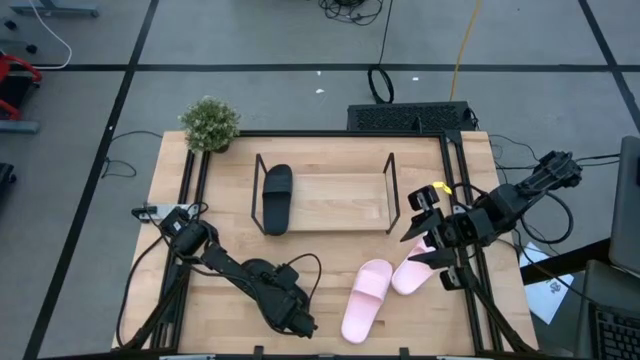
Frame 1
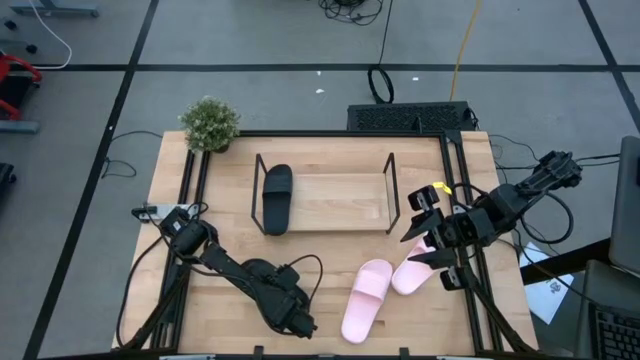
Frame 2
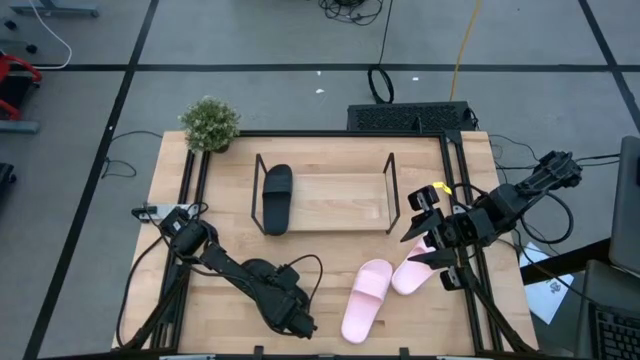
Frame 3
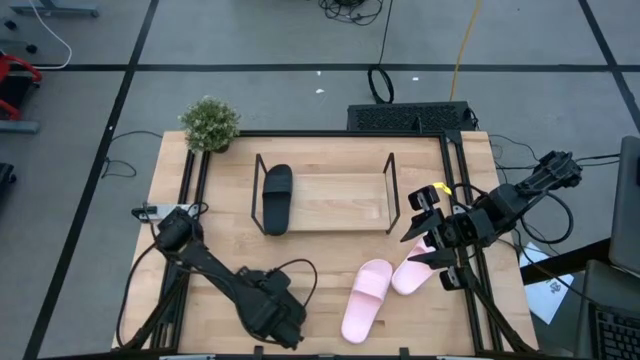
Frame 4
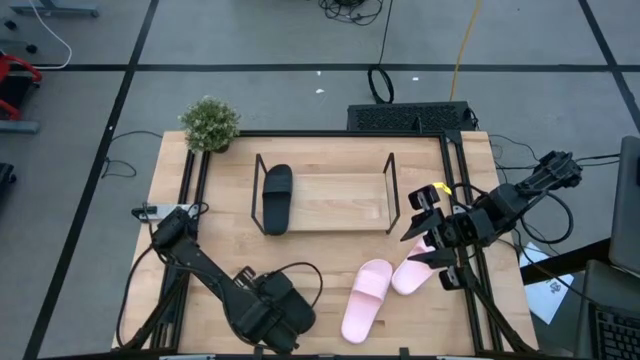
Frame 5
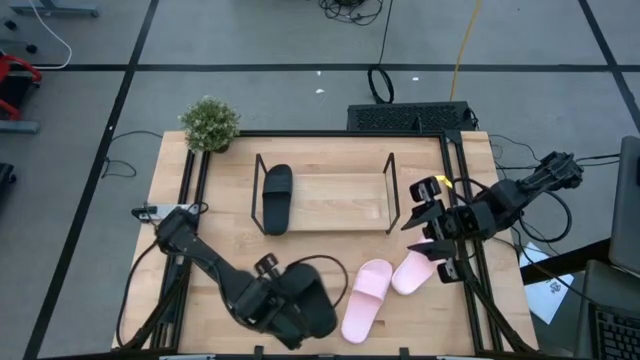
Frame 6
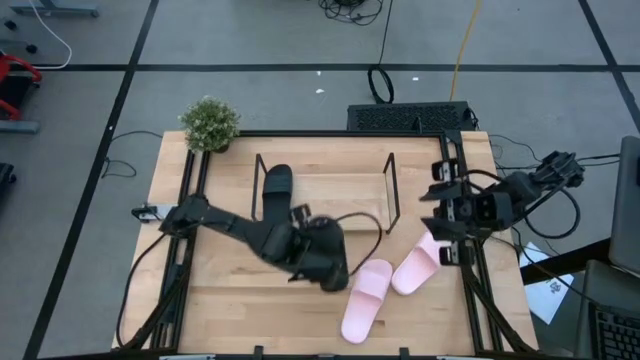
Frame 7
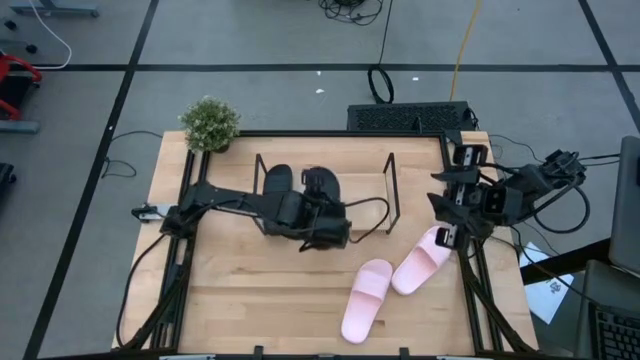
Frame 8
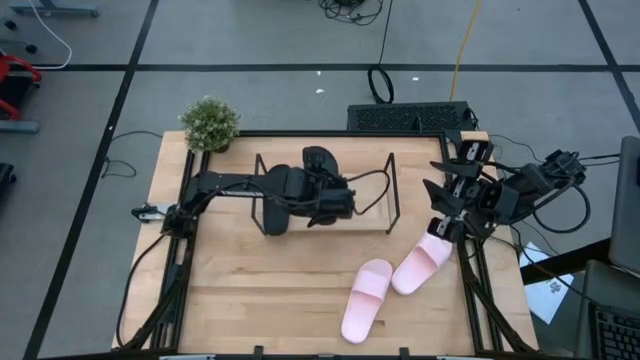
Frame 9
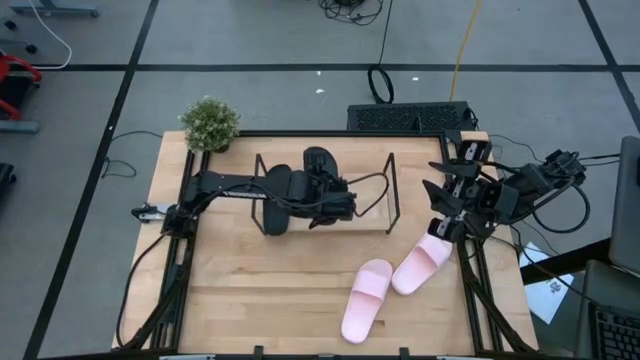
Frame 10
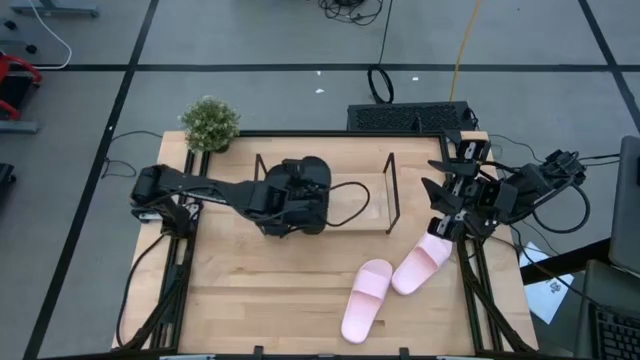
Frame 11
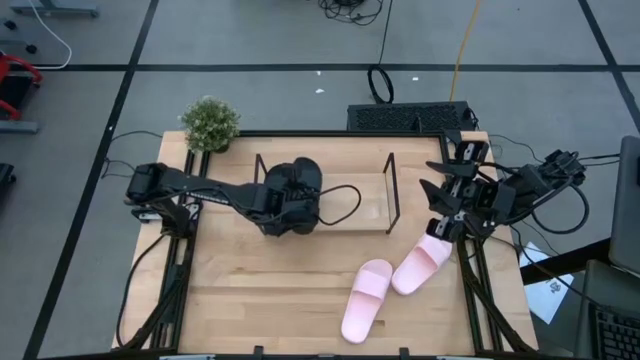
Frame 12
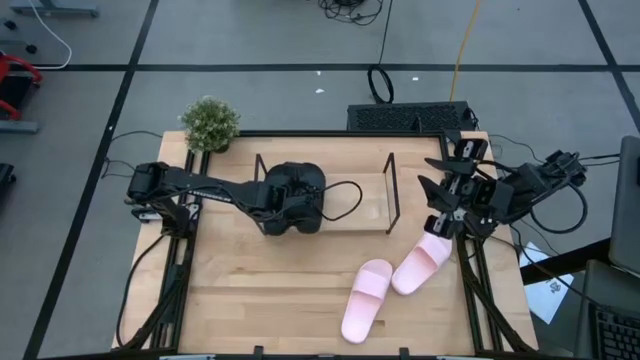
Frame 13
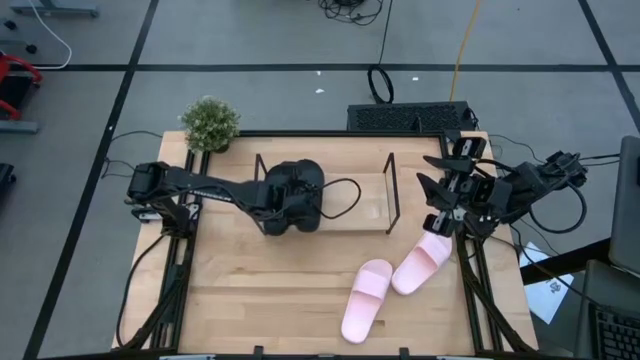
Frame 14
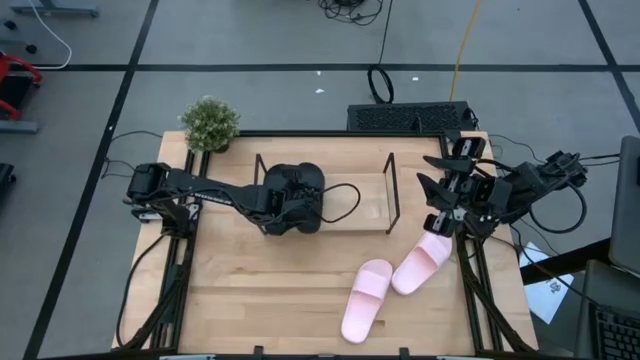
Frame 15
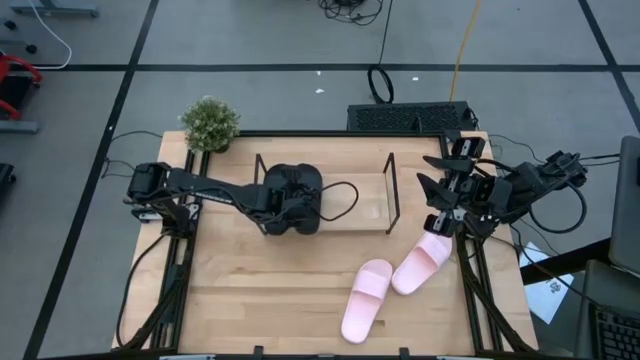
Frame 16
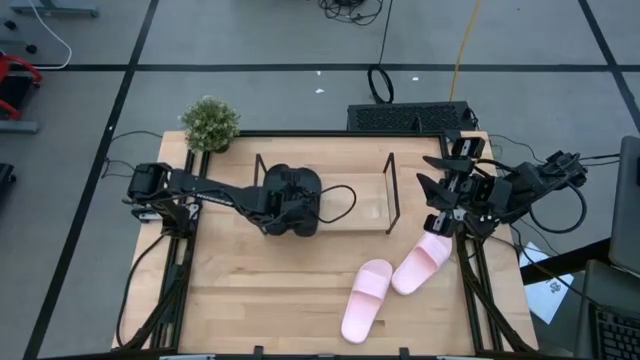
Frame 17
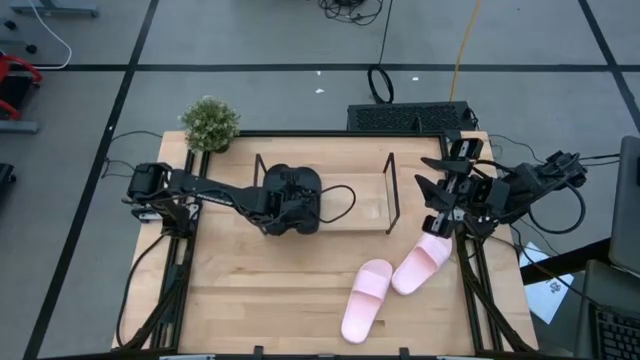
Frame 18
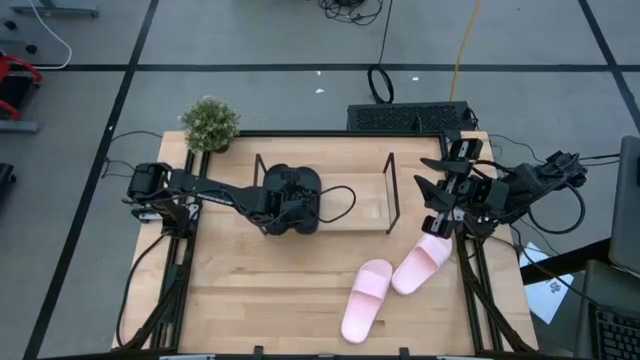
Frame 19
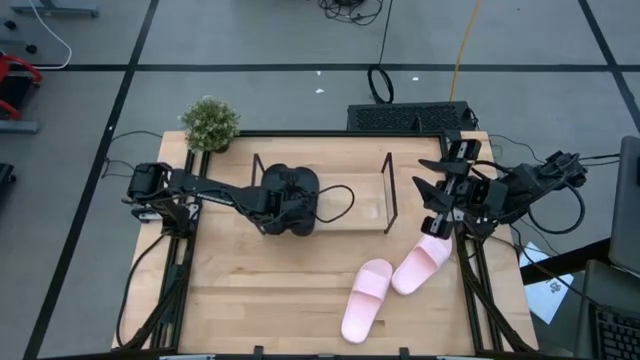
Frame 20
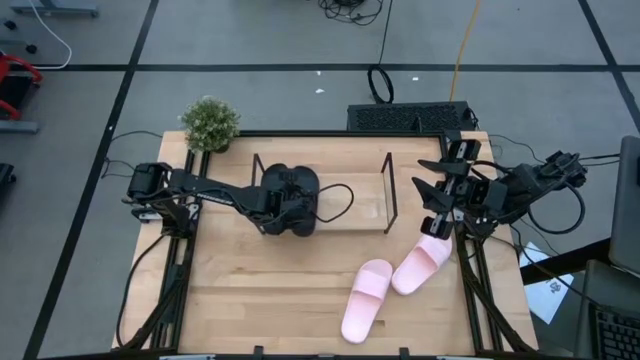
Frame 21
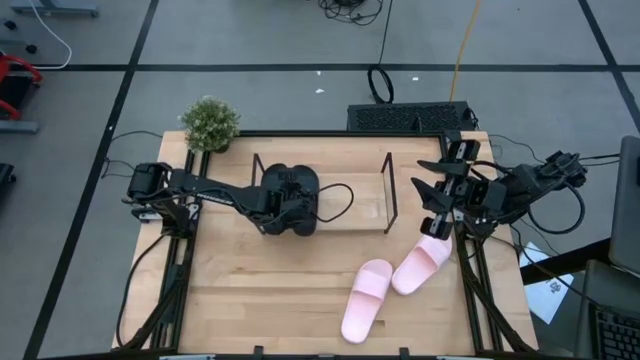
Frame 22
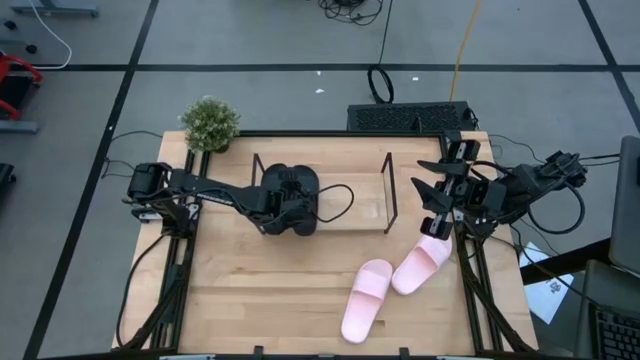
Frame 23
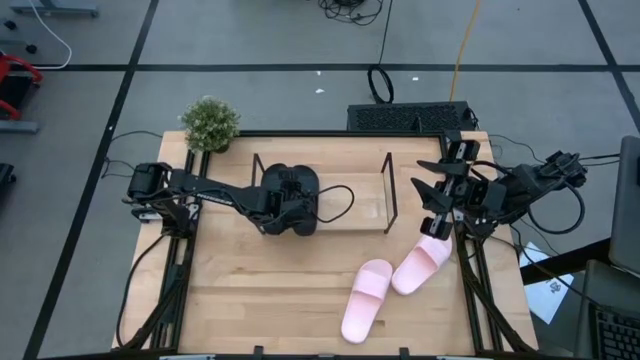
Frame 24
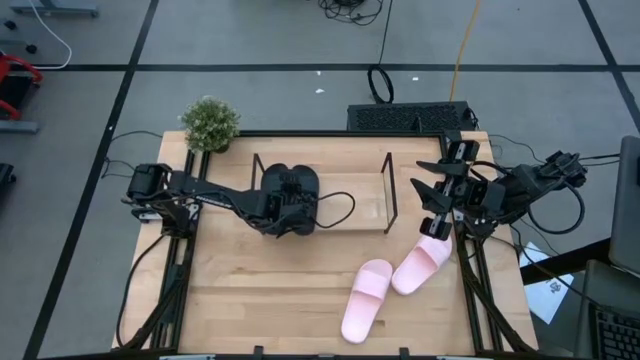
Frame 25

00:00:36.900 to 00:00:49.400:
Task: Pick and place slides into the shelf
Put the black slipper on the shelf

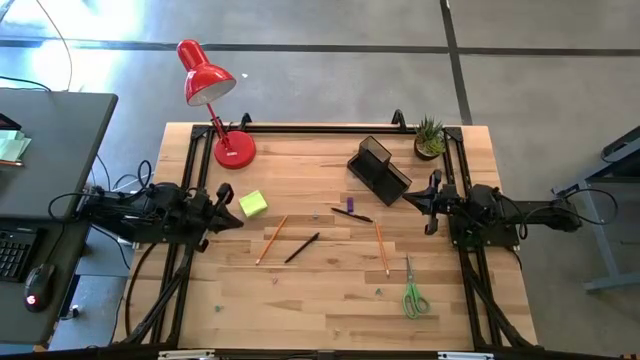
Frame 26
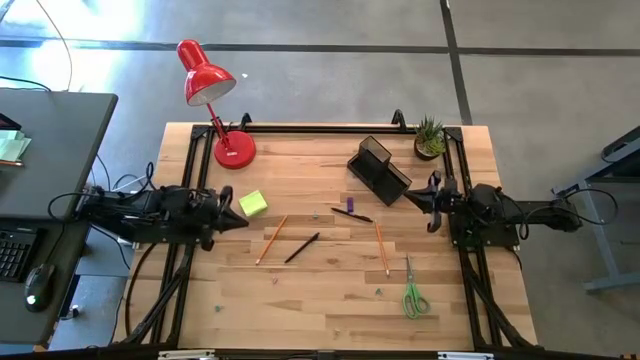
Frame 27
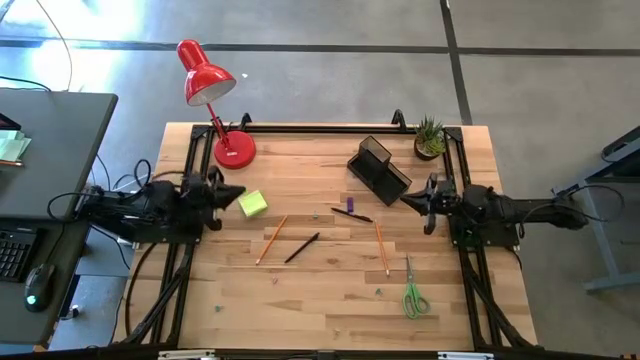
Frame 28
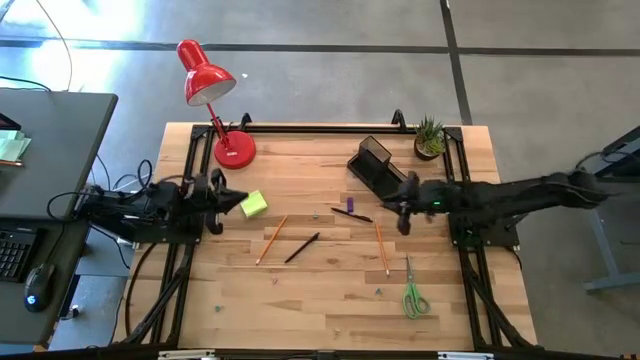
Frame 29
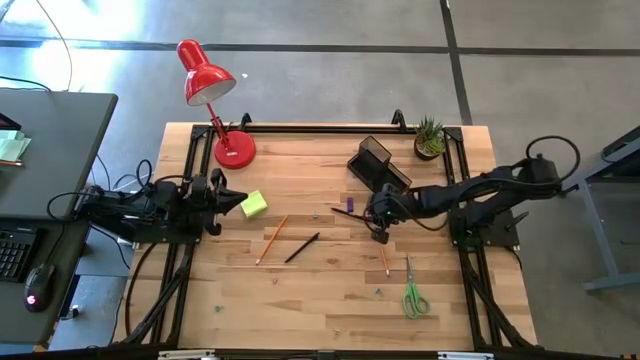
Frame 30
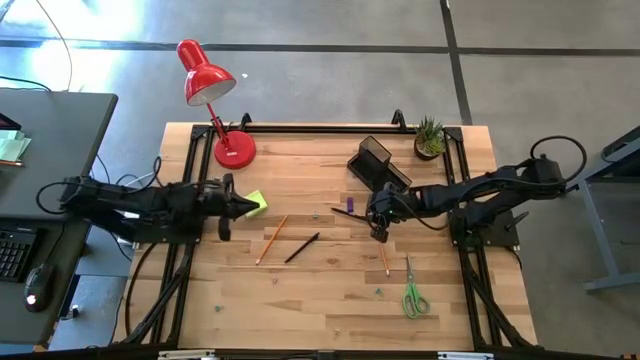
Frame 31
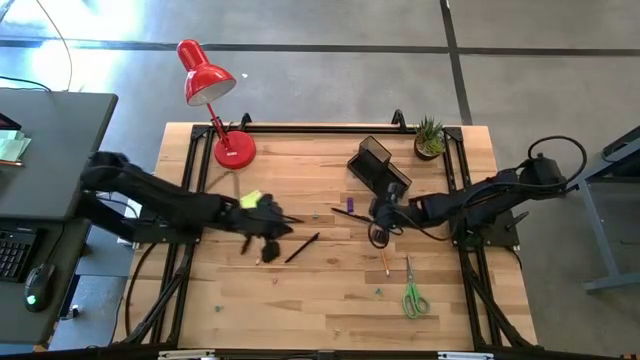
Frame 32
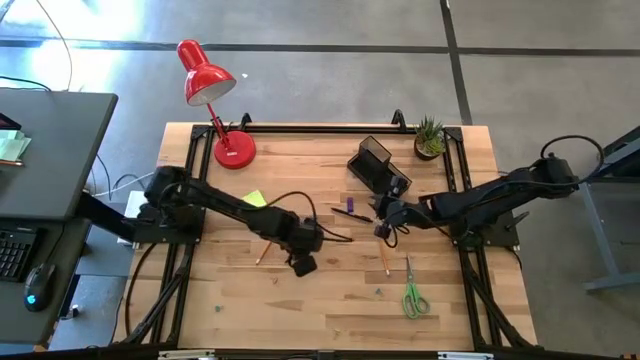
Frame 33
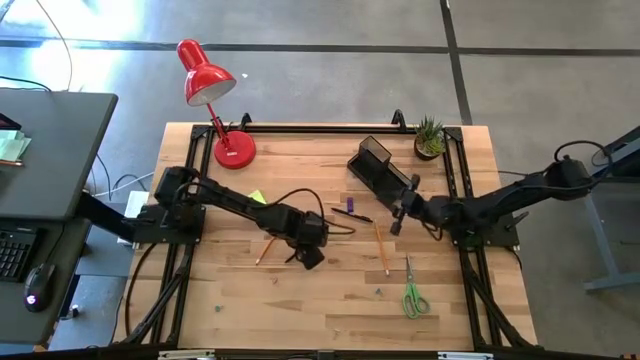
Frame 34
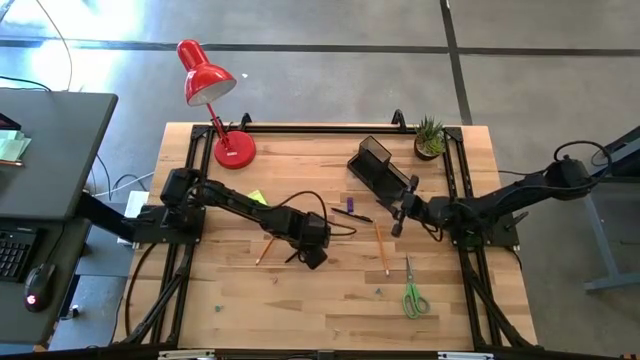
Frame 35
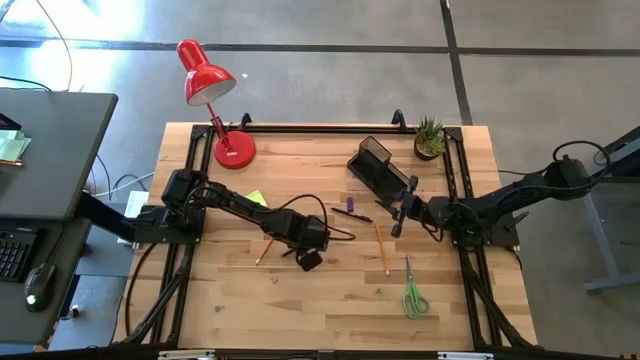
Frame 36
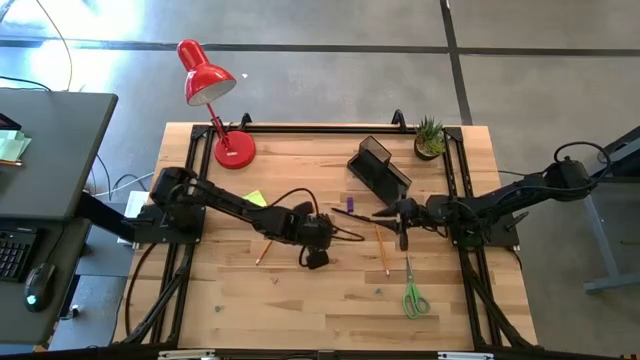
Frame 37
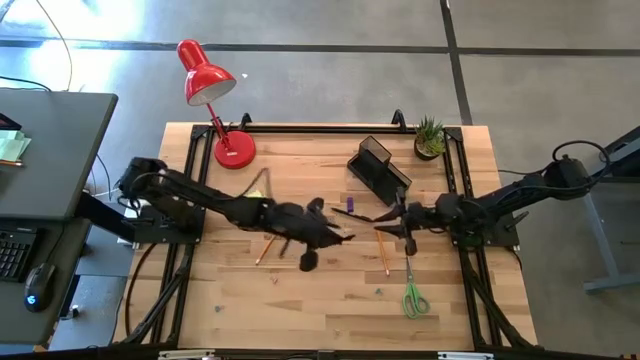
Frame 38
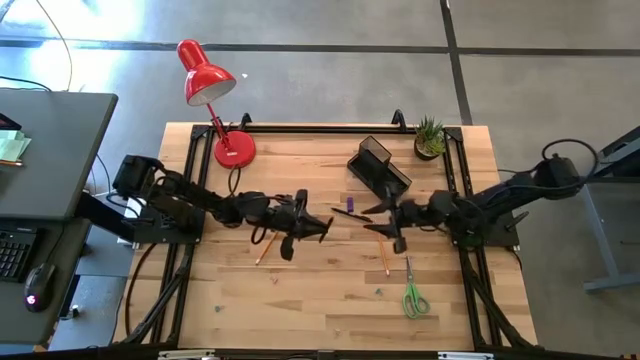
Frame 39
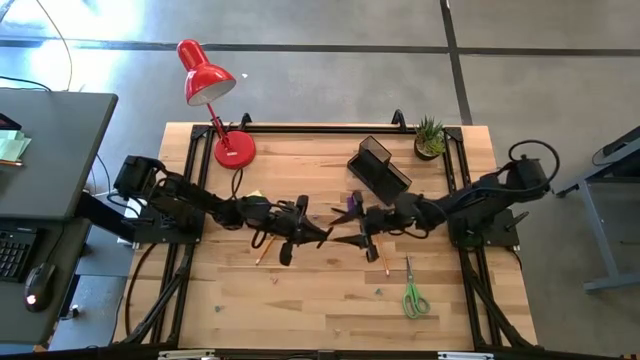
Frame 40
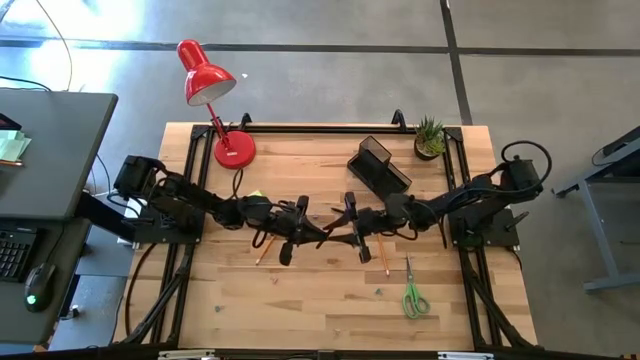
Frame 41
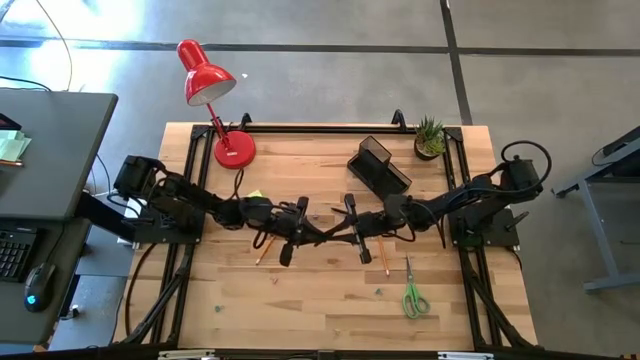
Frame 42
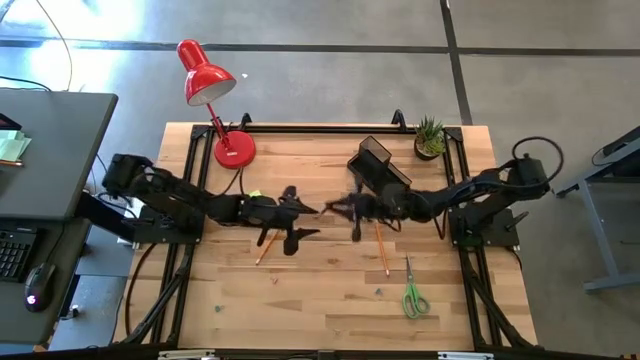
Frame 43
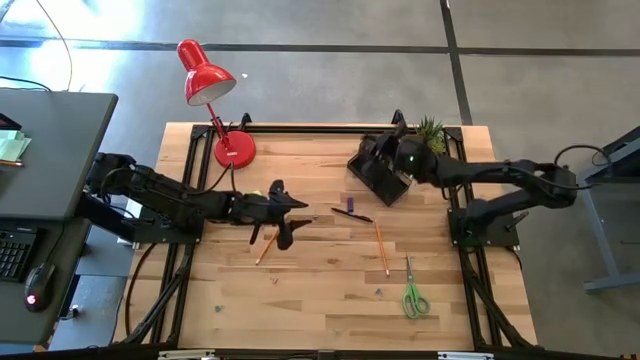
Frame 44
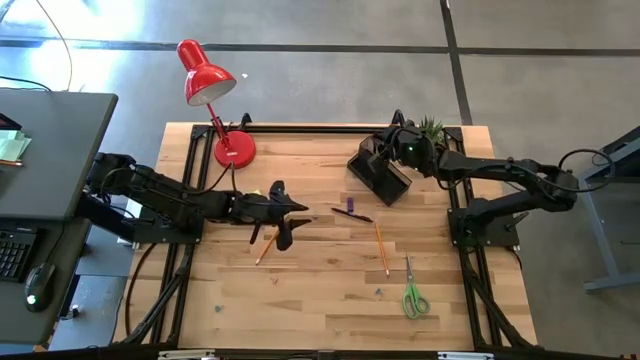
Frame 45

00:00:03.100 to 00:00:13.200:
Task: Pick and place office supplies into organizer
Put the left black pen into the black desk organizer
